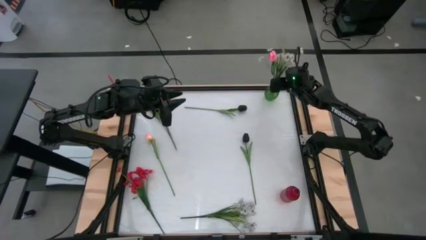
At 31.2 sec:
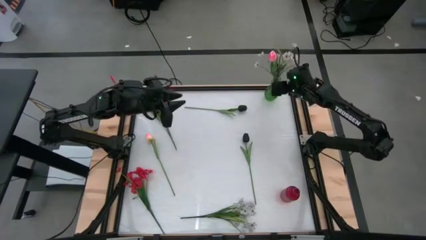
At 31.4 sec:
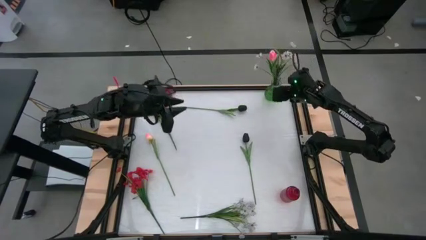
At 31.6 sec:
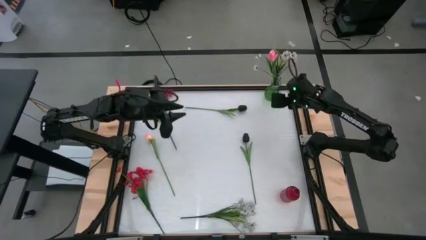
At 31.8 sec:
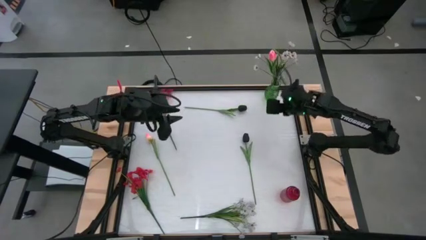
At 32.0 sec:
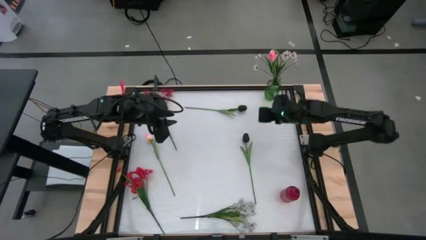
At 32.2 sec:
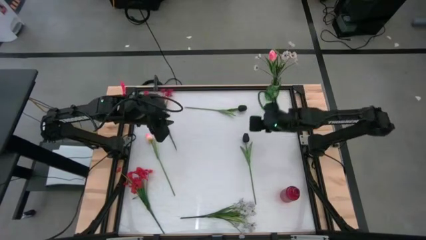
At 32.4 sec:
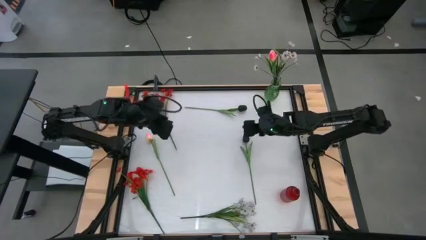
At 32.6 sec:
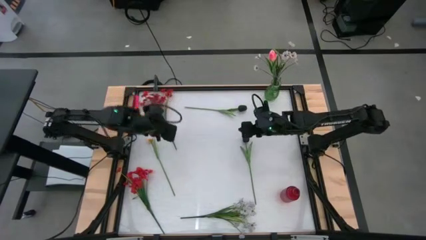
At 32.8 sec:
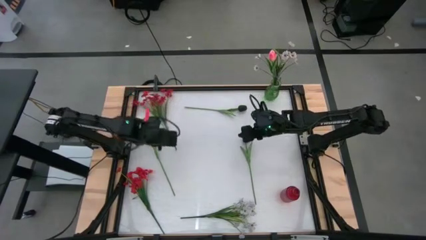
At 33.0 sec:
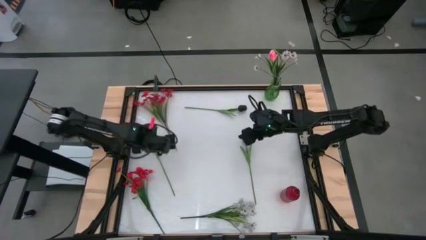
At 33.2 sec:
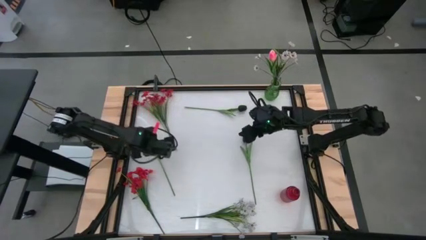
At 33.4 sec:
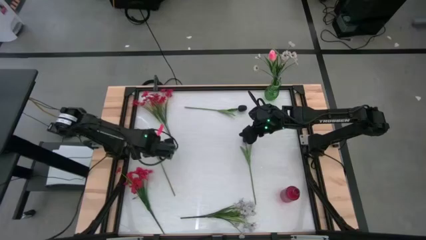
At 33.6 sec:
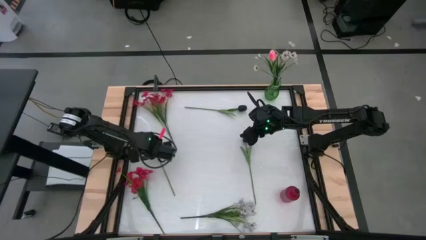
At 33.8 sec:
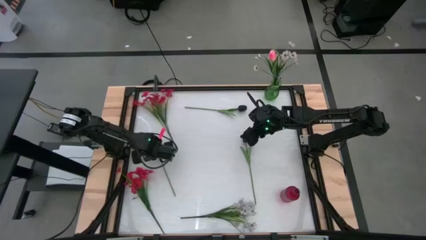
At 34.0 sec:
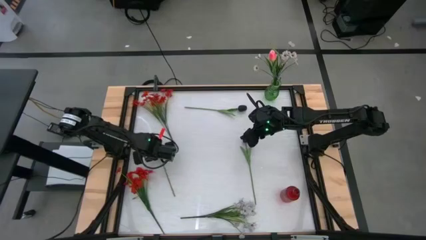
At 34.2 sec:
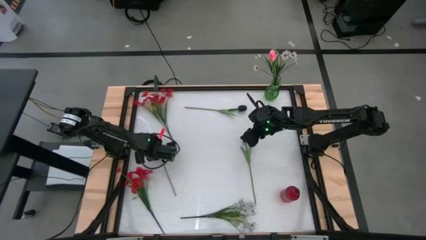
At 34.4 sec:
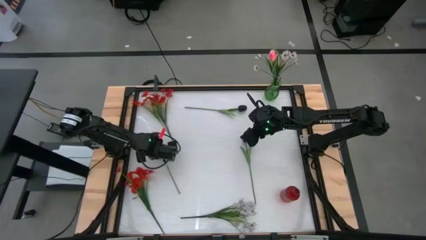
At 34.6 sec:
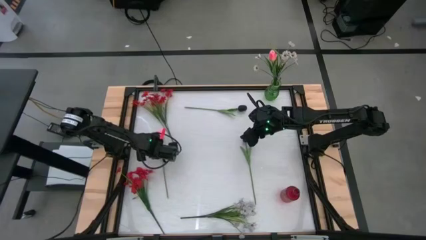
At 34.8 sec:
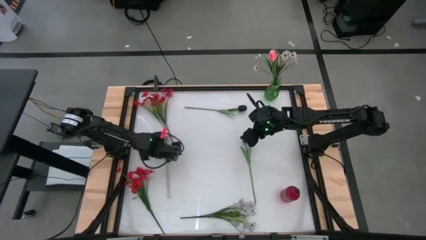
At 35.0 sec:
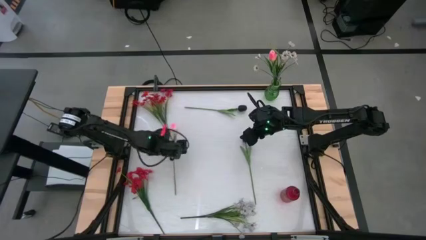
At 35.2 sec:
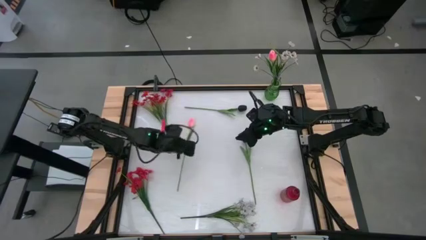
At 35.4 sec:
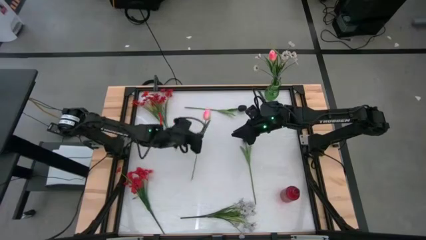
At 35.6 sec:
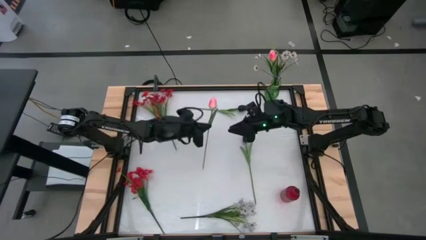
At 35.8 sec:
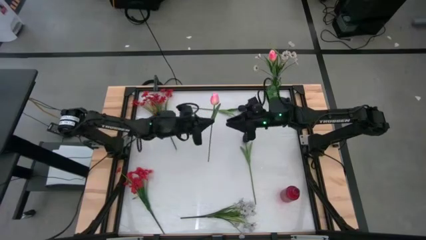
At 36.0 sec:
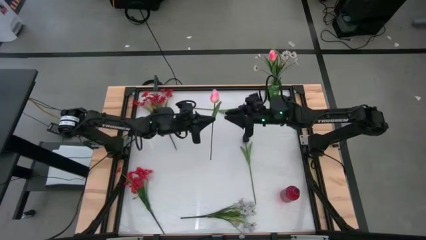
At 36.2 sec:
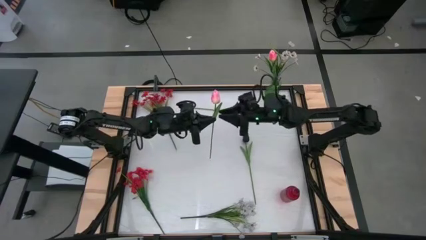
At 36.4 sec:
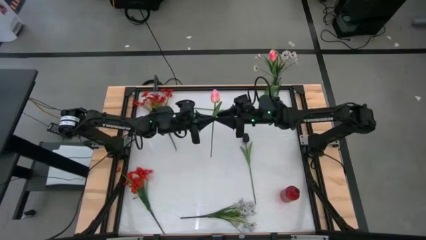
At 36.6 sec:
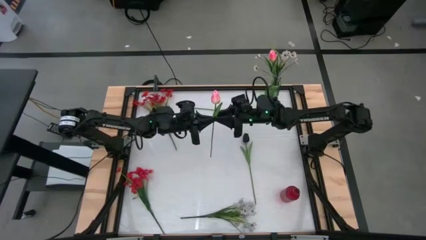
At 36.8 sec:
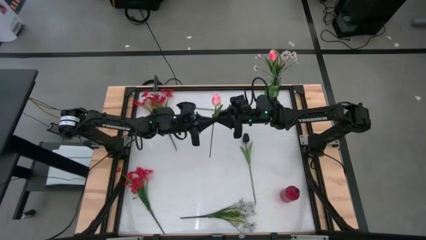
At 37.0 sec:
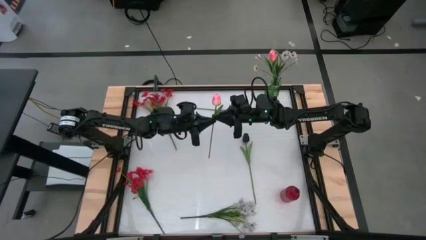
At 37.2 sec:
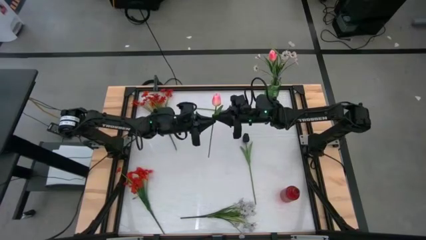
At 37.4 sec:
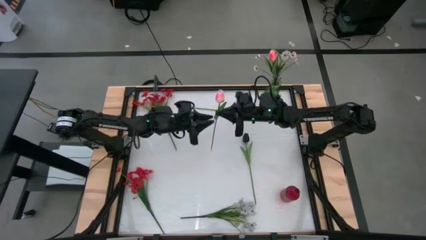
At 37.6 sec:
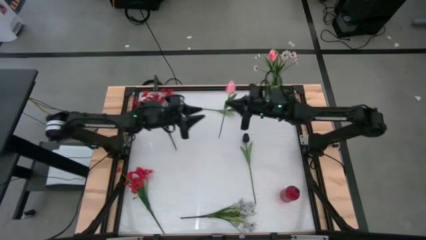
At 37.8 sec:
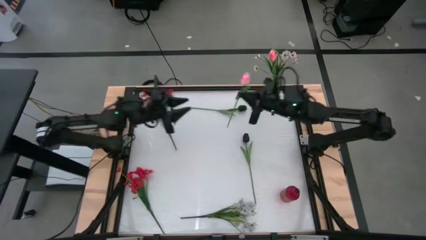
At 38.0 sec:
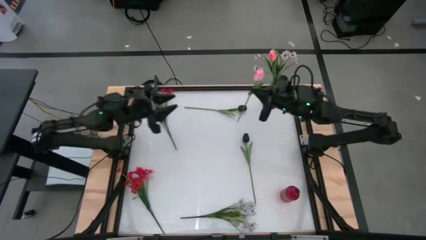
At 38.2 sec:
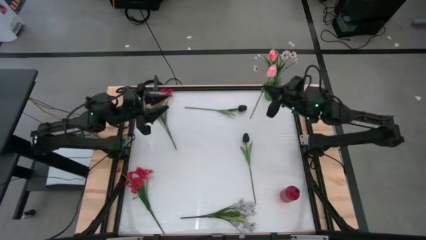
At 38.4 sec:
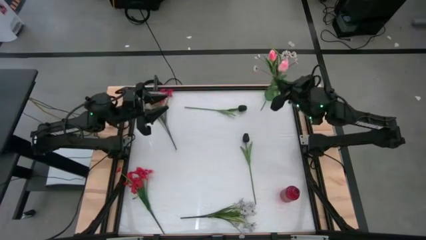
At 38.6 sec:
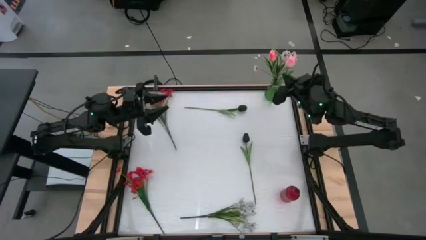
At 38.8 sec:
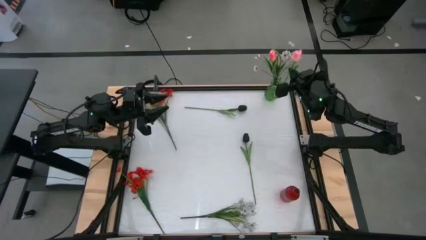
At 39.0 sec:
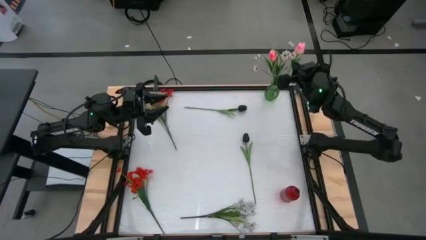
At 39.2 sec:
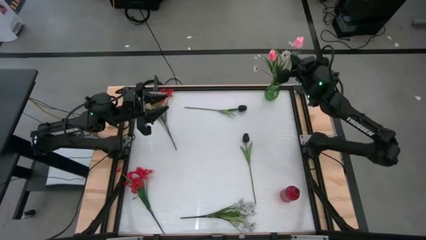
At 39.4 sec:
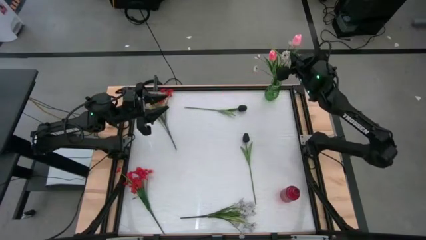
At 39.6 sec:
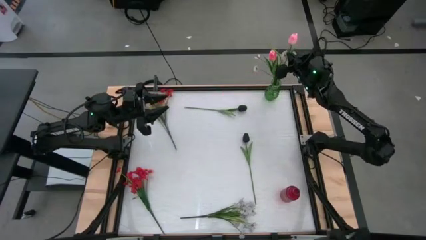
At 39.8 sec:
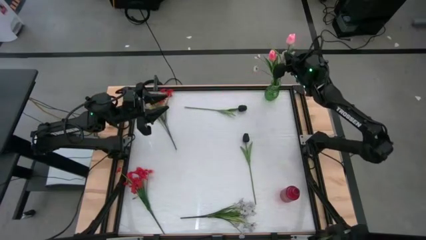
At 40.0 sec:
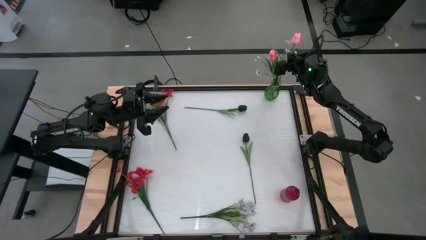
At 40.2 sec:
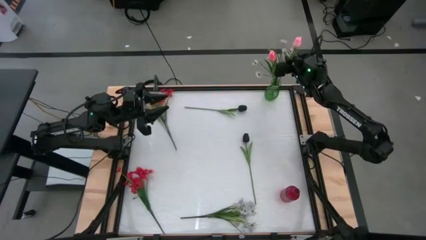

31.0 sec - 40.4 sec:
Task: Sort flowers into vase by color
Put the pink flower into the green vase
